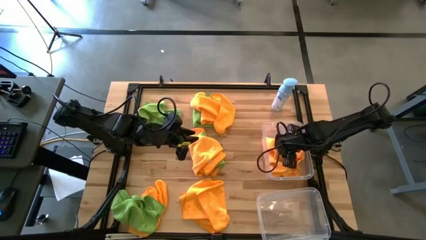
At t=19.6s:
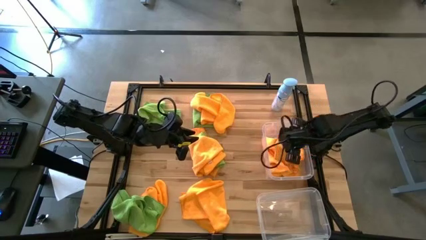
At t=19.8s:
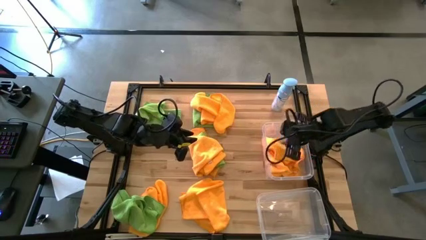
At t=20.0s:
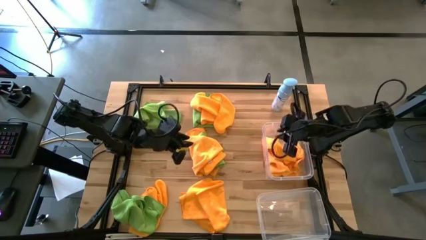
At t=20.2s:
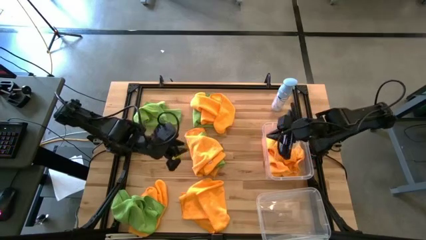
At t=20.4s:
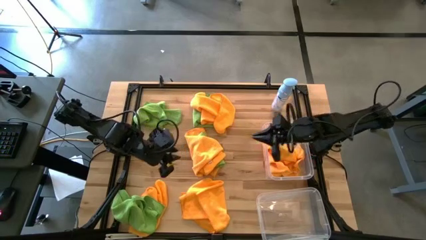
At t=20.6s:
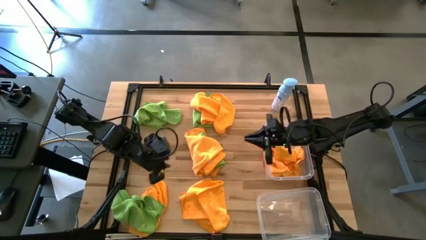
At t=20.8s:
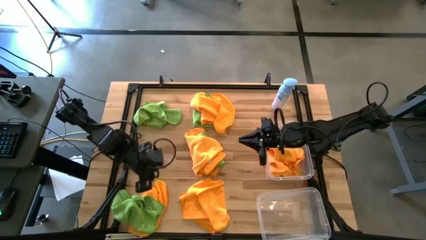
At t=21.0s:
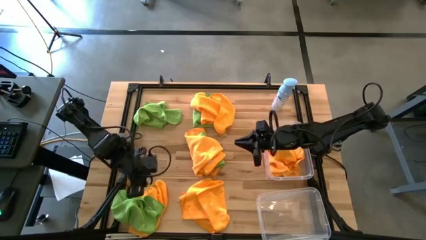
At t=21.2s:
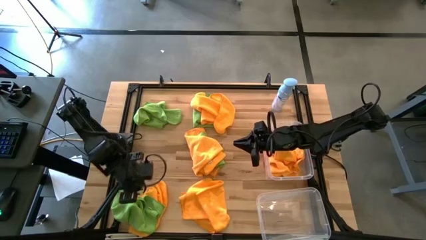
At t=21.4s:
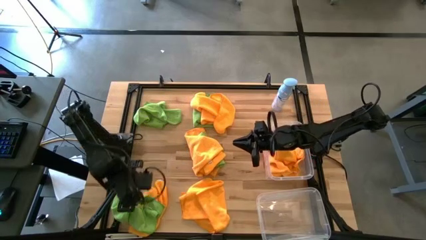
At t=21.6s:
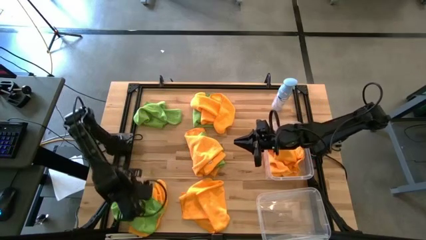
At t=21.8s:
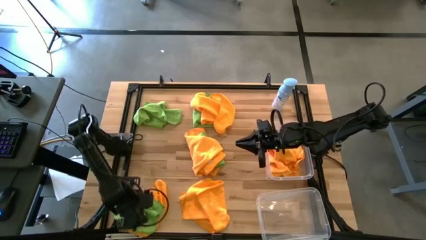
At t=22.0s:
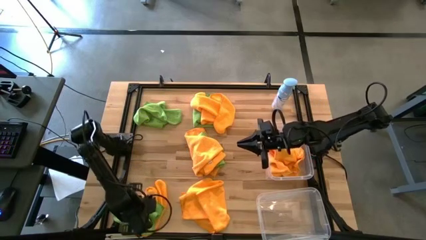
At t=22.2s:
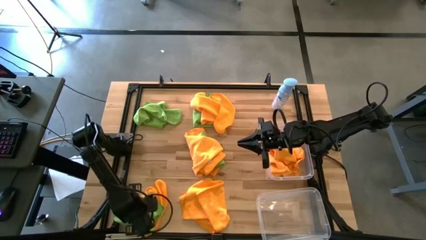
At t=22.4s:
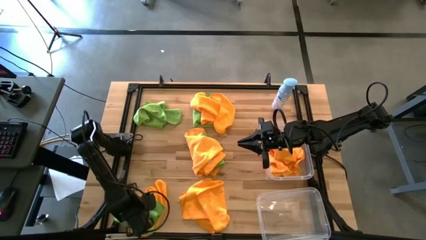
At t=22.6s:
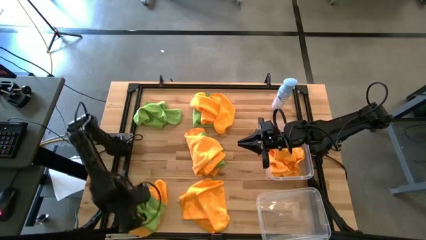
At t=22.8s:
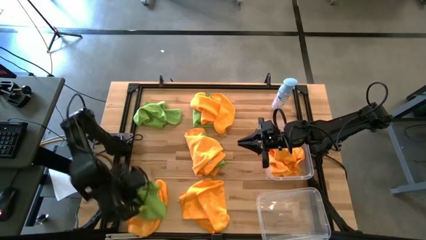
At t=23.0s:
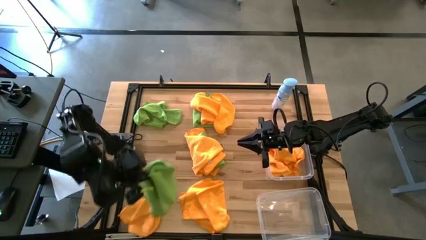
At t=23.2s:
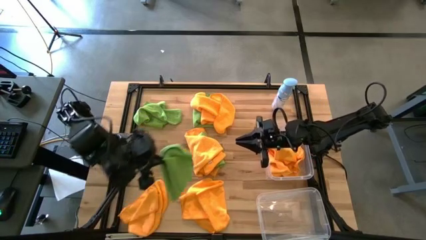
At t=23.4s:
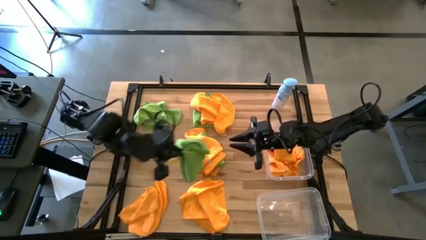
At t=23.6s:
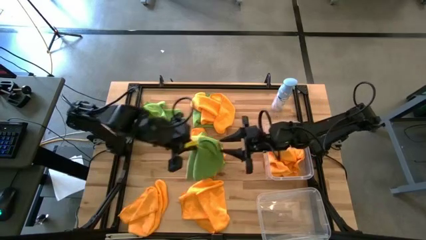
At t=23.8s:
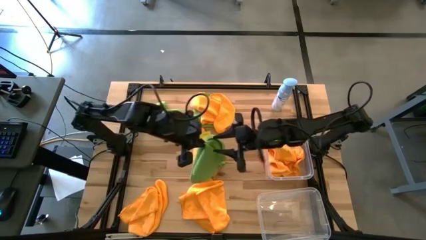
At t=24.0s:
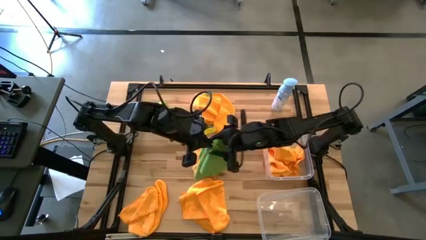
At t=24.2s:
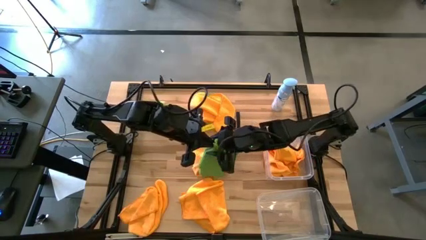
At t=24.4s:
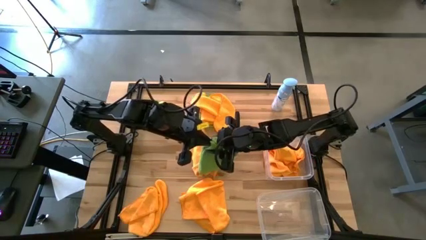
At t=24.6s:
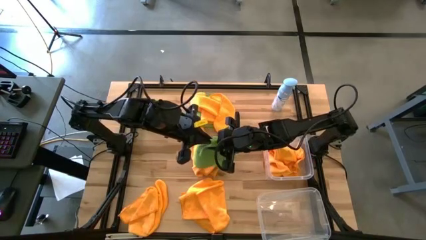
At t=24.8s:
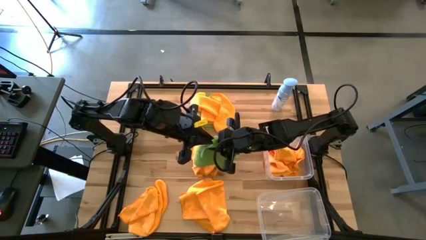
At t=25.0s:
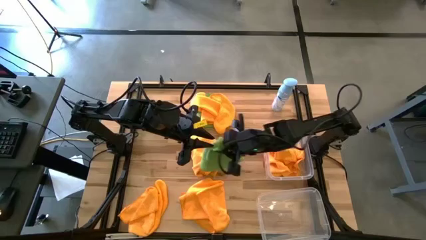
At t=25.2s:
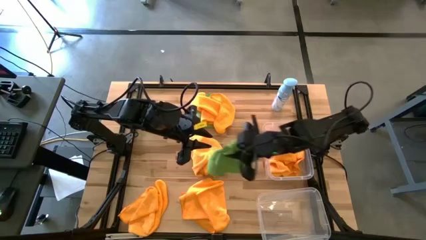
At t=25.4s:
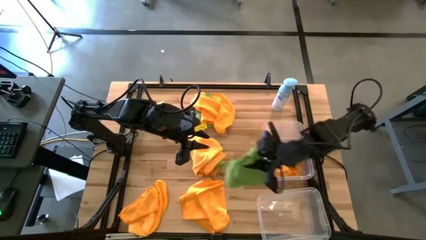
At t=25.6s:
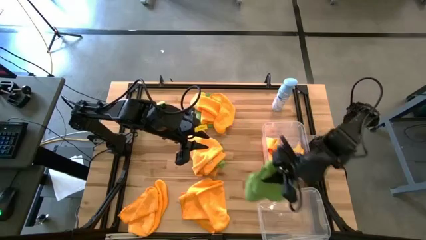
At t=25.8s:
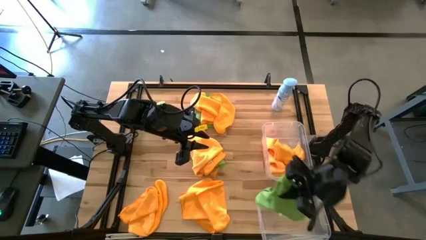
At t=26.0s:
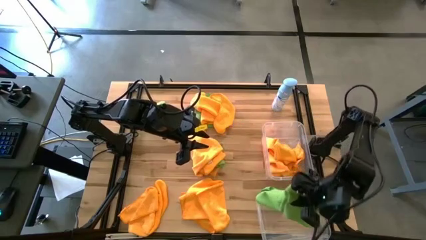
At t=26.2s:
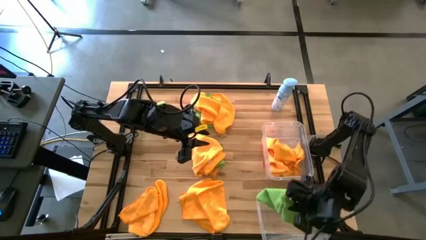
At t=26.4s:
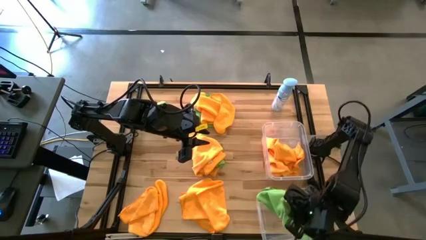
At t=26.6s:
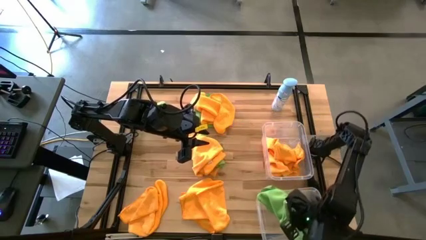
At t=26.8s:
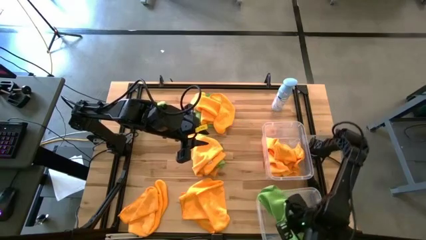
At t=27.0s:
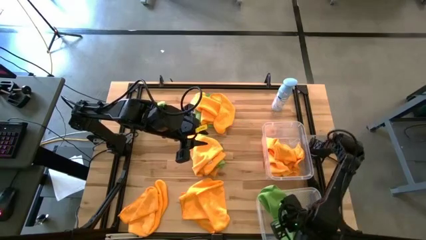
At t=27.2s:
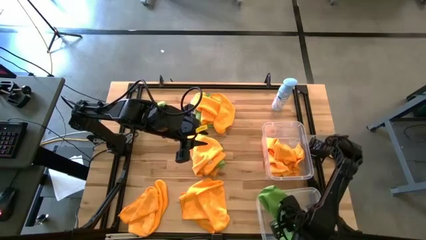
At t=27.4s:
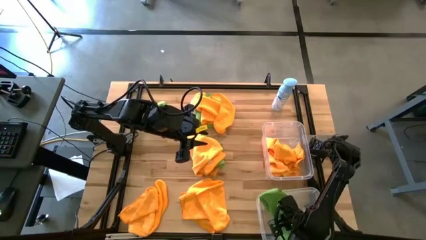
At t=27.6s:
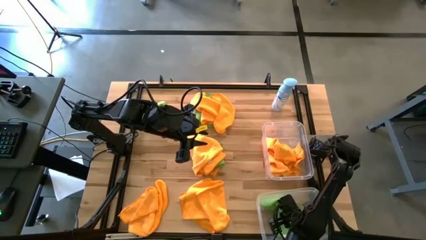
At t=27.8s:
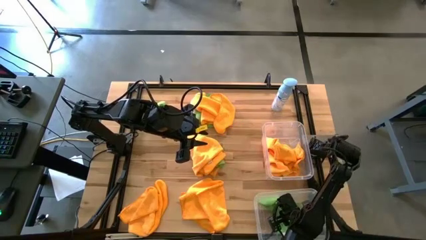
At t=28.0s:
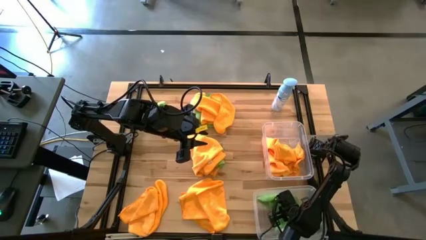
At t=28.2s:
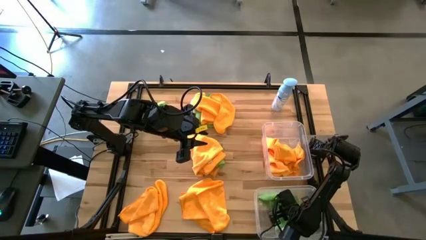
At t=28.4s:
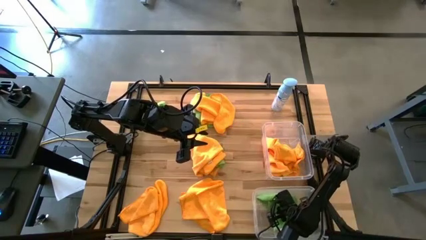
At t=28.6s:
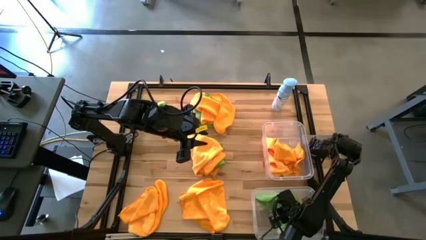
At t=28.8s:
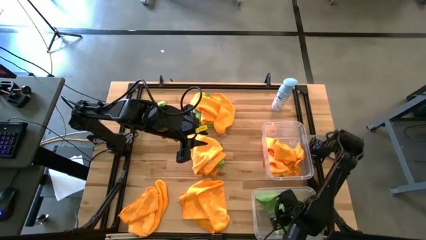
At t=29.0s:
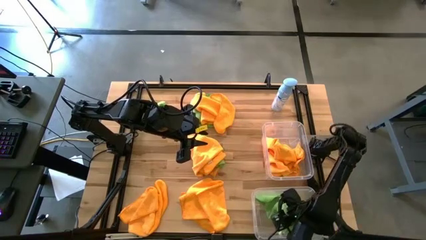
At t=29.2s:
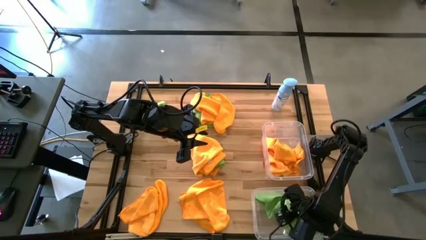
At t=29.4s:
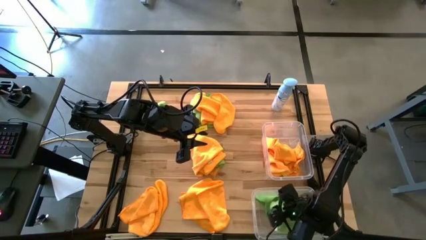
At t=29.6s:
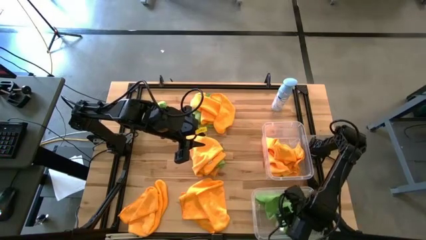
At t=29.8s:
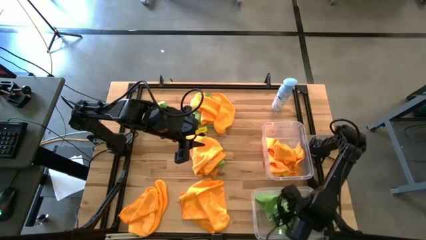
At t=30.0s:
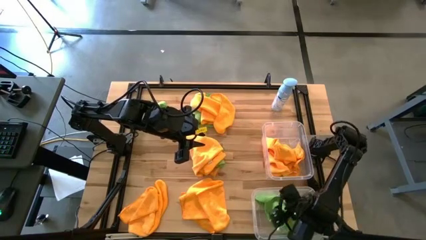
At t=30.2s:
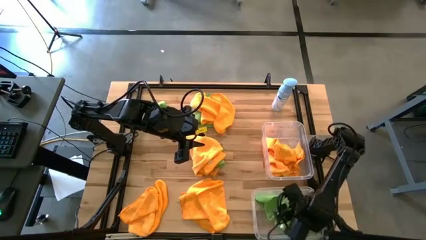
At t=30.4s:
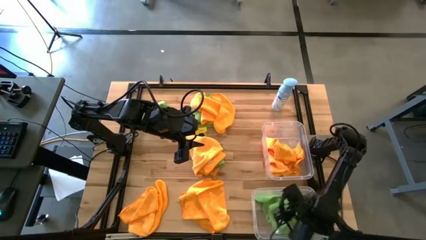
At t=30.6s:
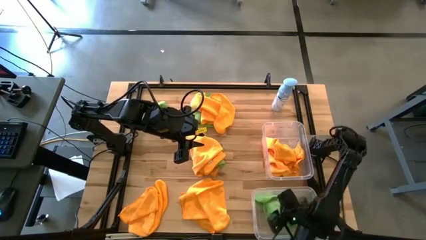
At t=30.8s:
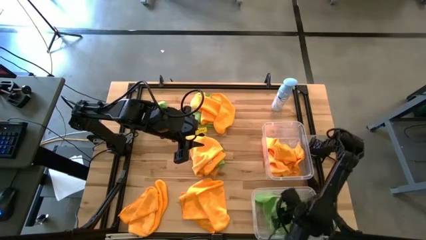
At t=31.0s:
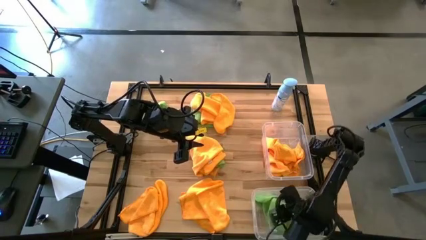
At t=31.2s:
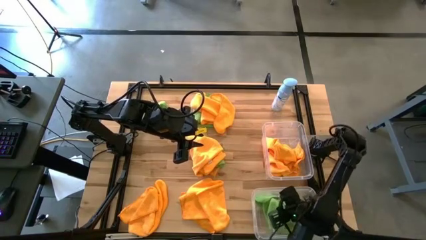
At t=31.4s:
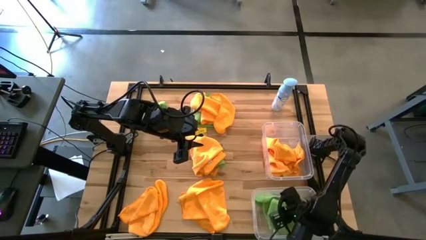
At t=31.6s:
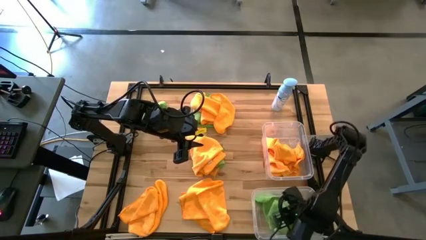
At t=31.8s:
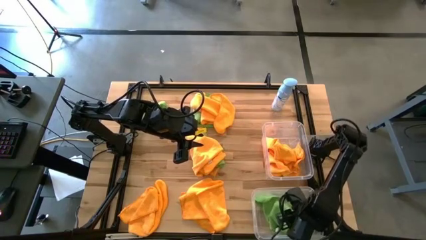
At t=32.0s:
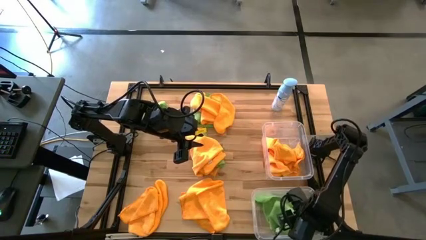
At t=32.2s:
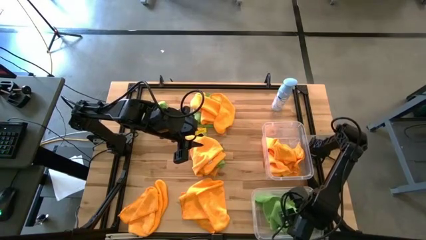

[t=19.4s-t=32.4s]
Task: Sort microfiber towel by color & place in baskets
Put the green towel into the bottom transparent bin
